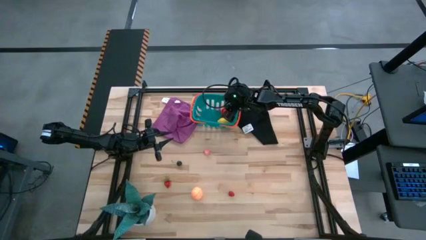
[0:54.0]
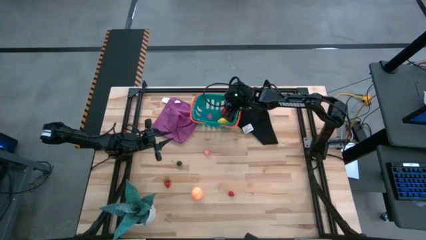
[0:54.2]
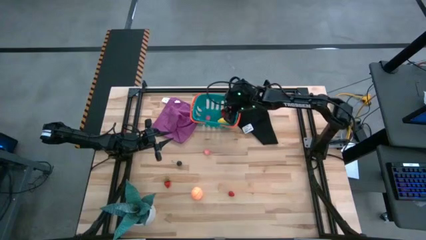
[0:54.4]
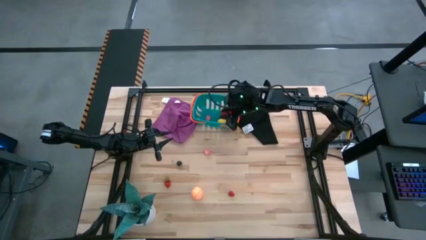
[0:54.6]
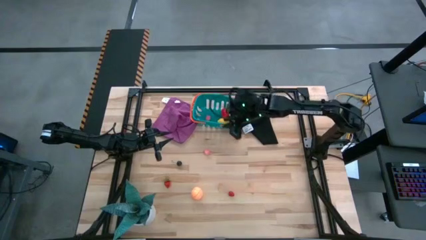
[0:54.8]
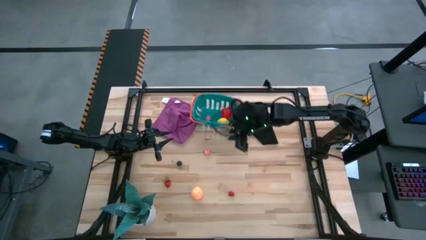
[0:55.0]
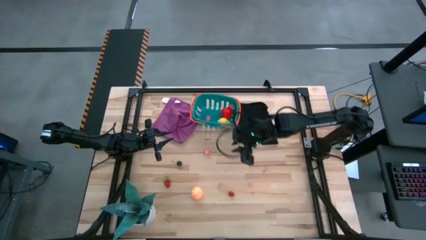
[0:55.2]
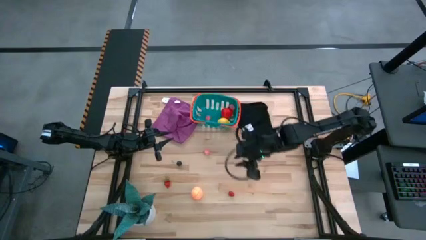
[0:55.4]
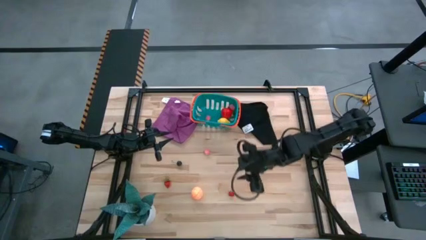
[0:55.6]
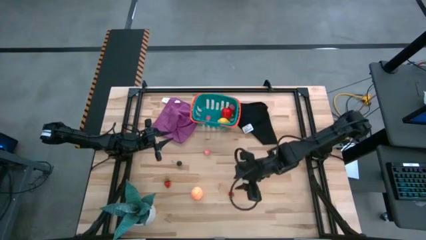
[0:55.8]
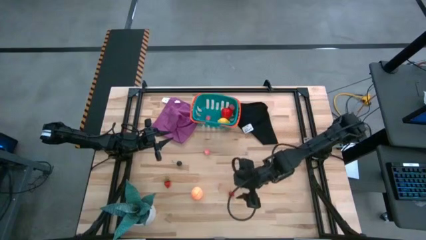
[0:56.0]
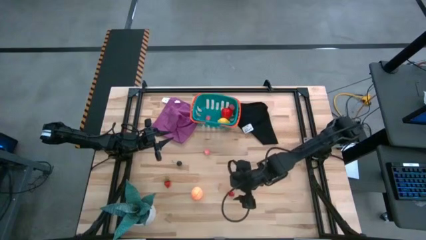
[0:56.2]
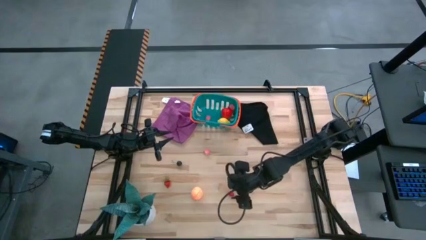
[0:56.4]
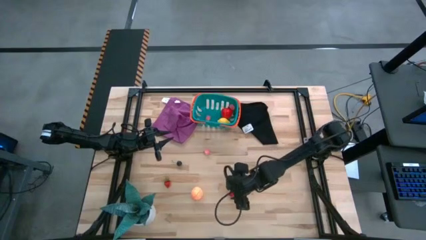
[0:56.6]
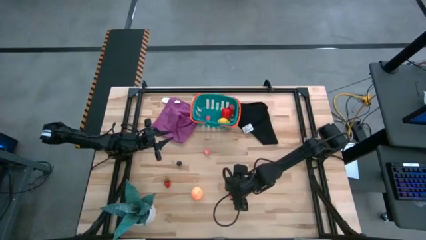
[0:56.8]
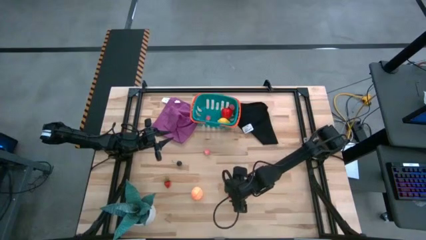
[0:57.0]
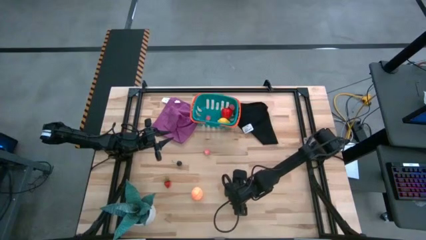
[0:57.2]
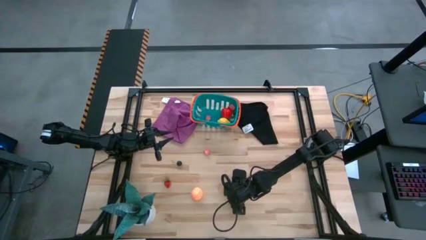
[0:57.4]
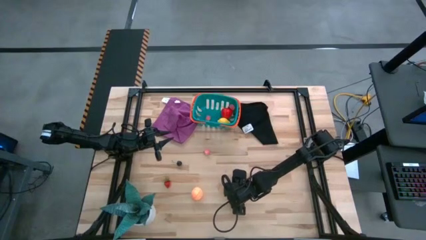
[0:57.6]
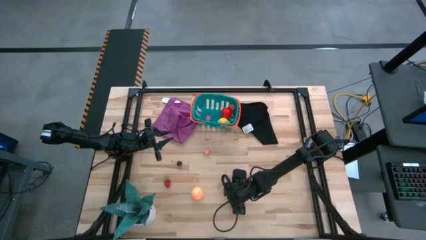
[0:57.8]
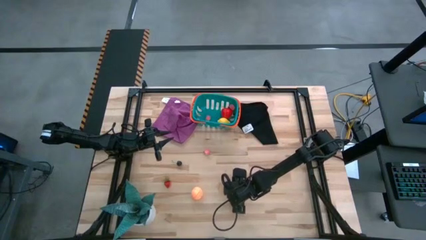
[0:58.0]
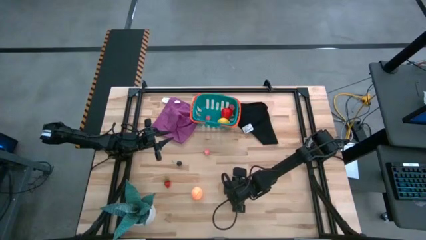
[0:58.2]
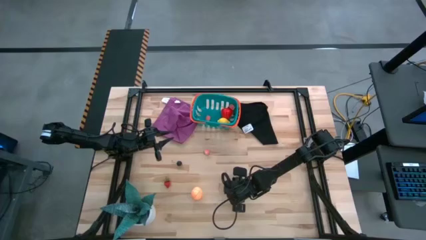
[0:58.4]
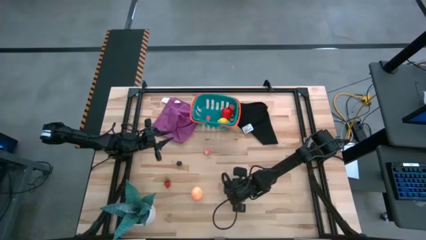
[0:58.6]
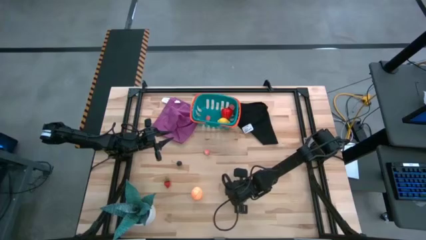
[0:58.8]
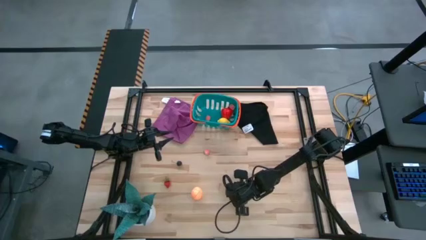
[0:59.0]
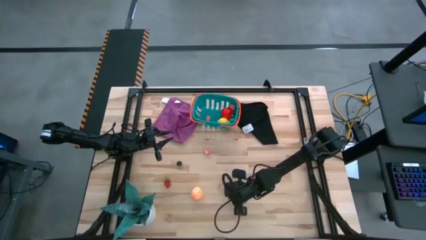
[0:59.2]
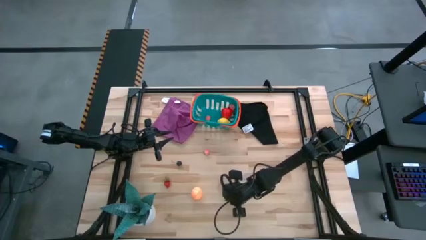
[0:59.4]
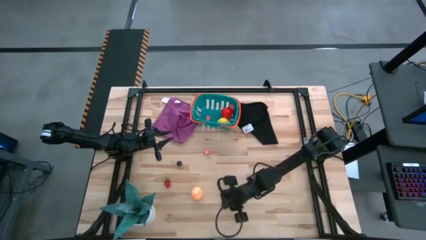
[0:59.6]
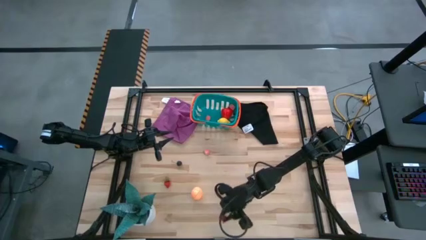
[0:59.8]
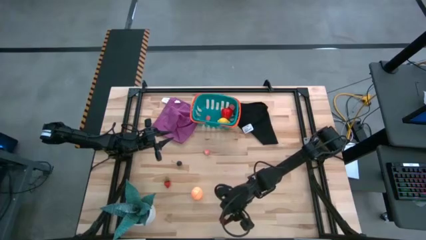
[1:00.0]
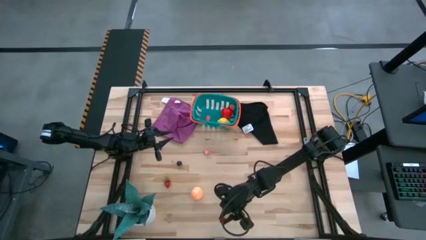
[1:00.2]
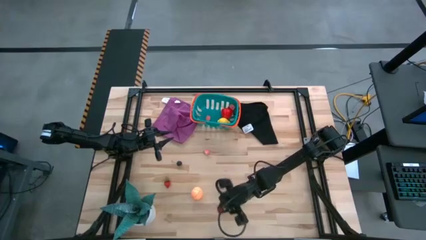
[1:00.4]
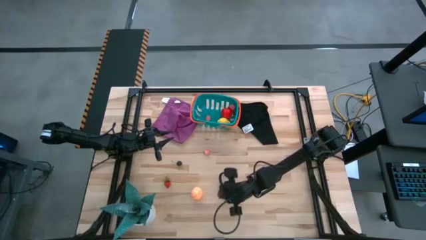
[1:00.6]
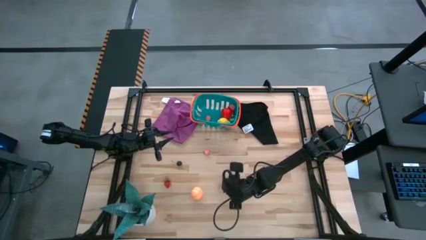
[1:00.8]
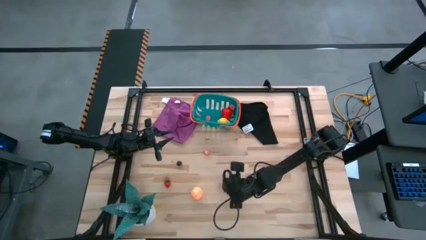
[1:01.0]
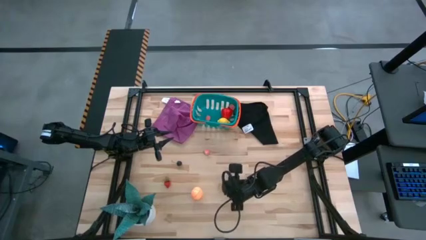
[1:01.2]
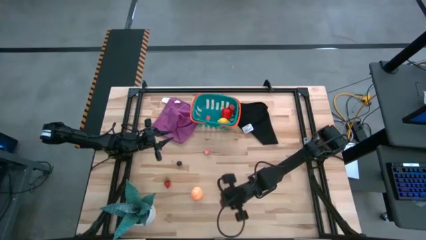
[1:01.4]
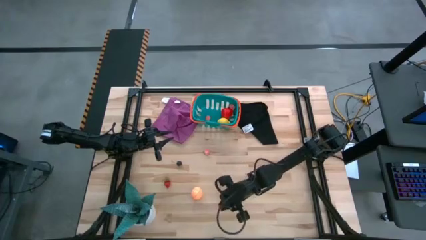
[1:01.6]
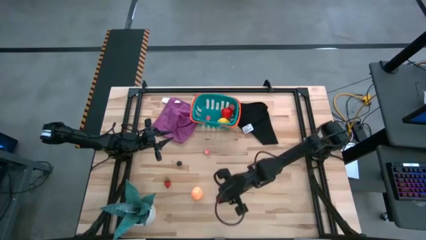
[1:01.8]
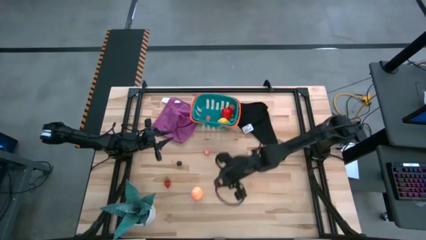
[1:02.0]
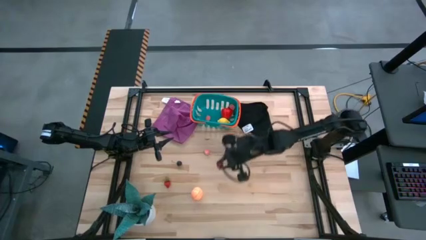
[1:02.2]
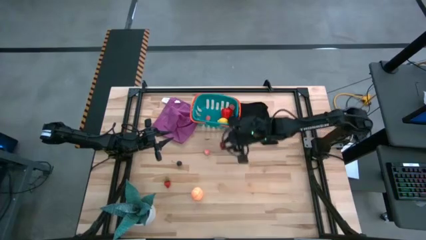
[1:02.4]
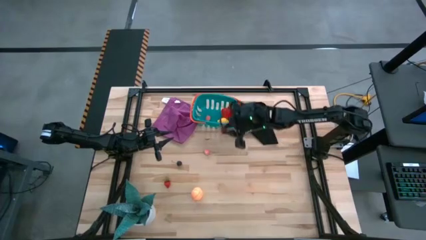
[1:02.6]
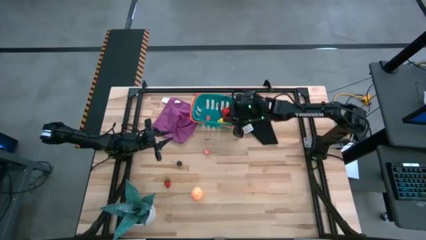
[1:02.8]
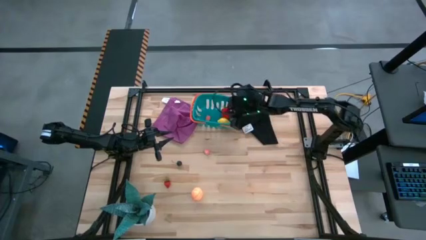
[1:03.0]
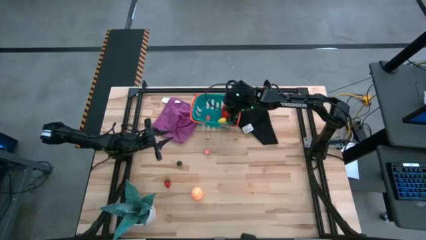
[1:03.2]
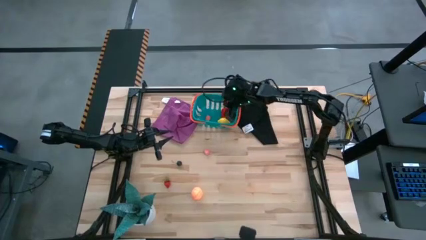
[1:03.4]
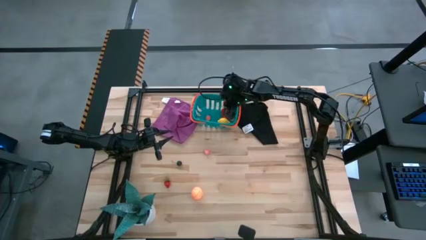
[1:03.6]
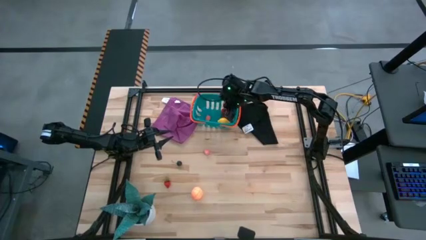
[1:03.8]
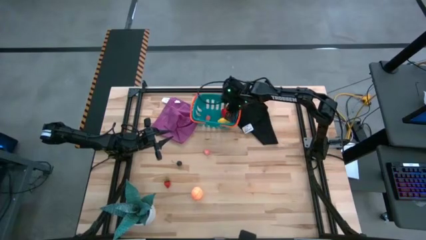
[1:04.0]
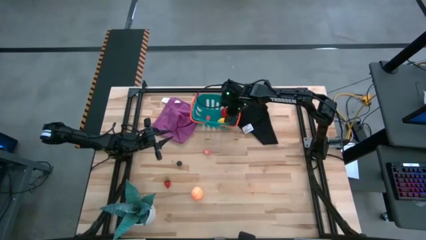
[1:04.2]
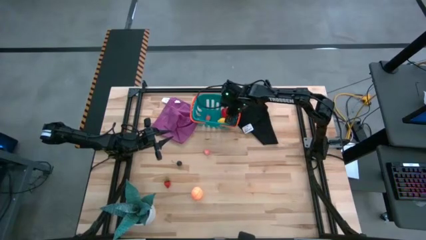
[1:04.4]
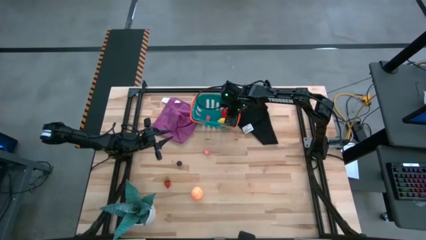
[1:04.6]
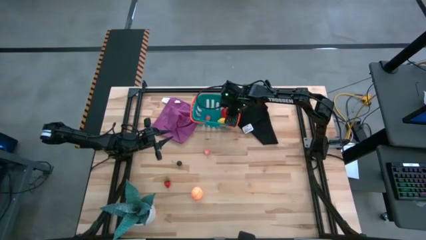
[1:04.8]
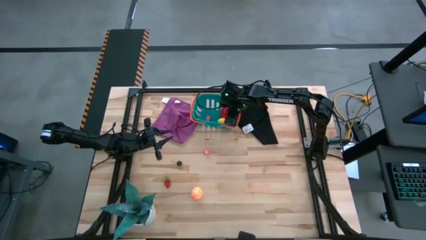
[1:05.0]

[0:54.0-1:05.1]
Task: Pick and placing Produce into tupperware
Put the red raspberry into the blue bin
